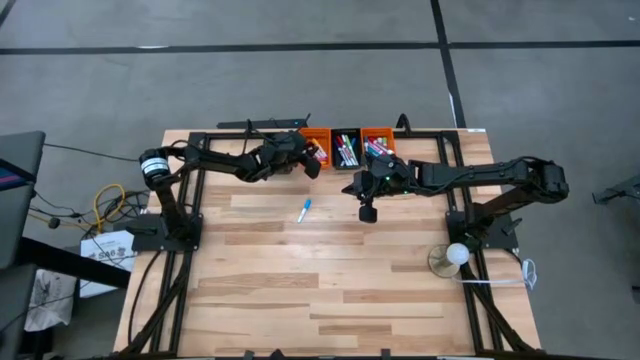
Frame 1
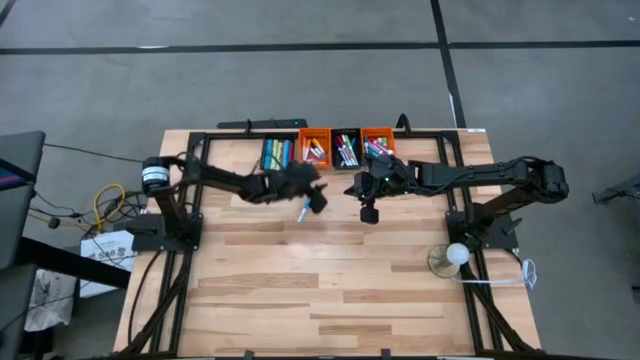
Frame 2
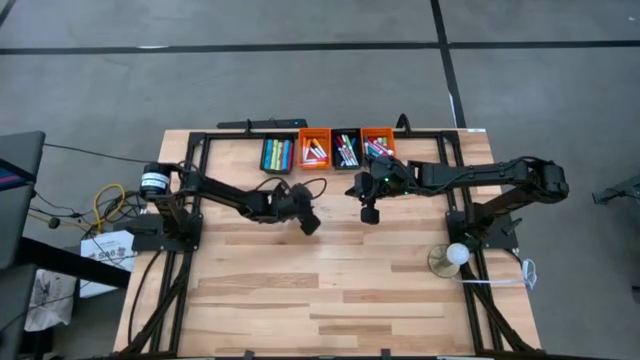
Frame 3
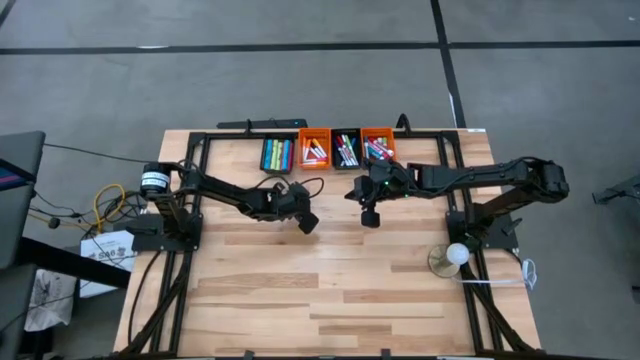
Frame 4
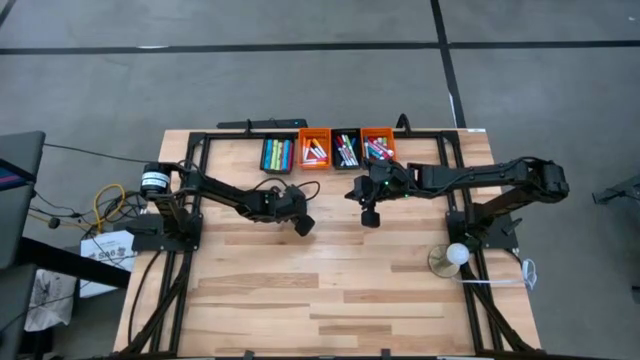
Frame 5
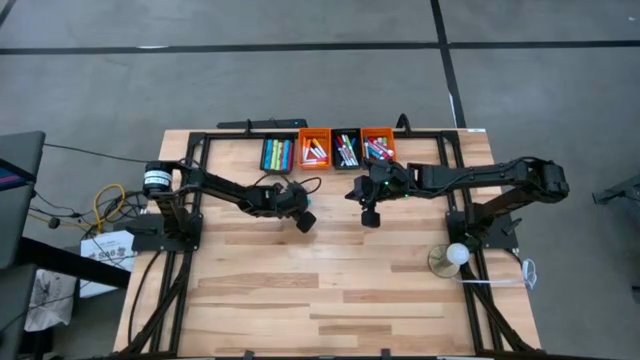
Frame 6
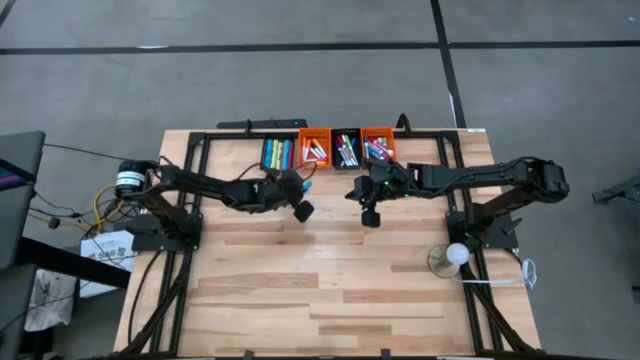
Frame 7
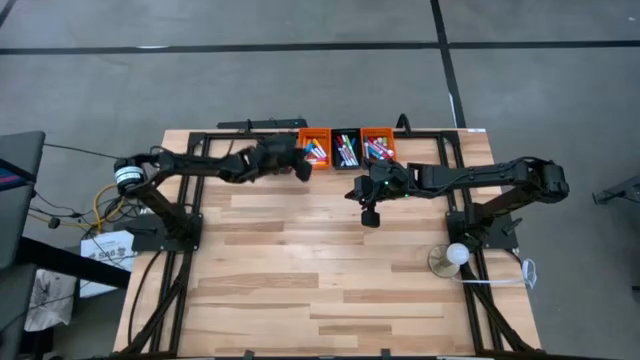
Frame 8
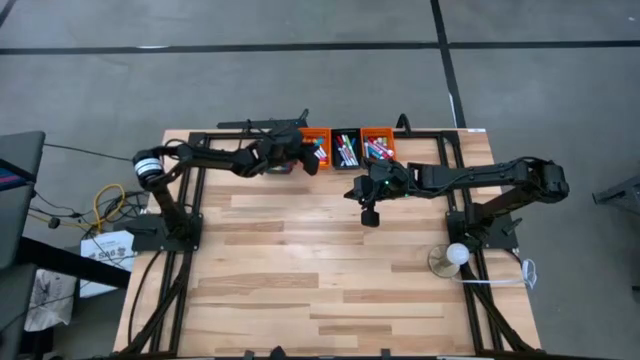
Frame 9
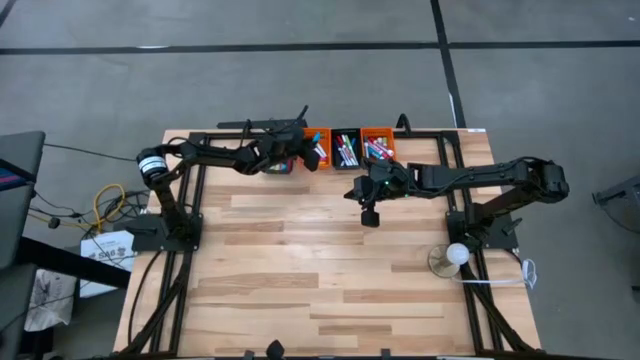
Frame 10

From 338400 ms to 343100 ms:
Task: Pick & Place Markers
Put the small blue highlighter pen into the left orange basket

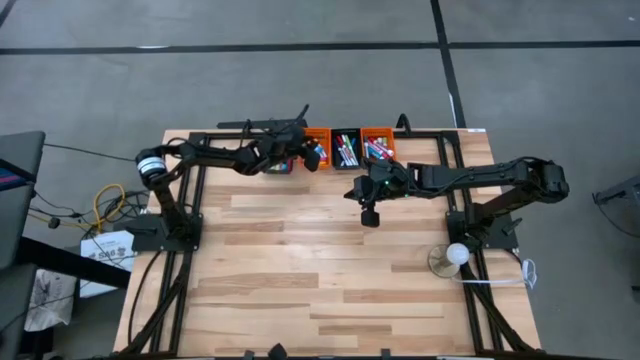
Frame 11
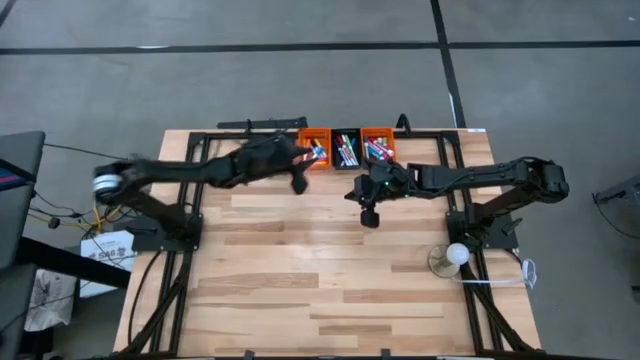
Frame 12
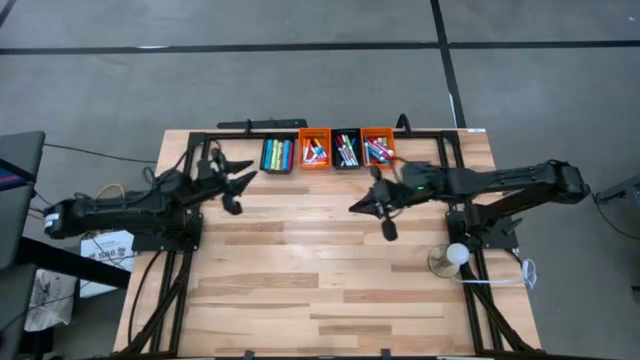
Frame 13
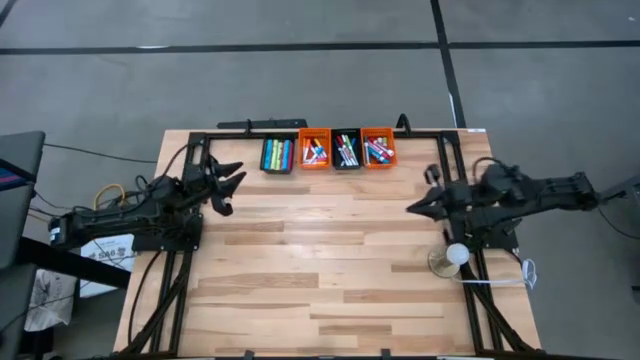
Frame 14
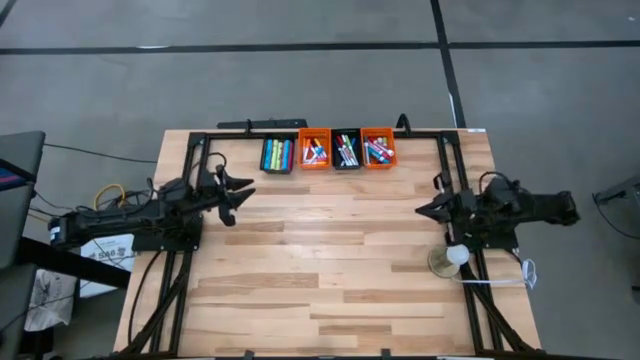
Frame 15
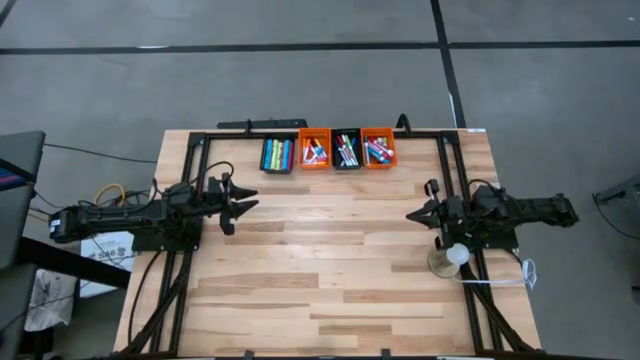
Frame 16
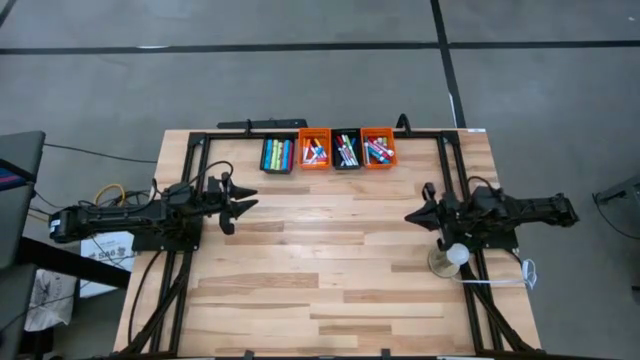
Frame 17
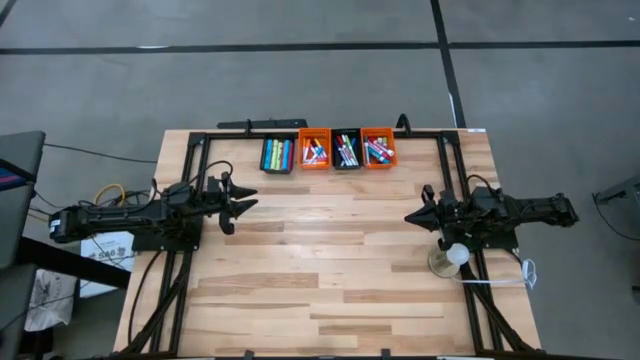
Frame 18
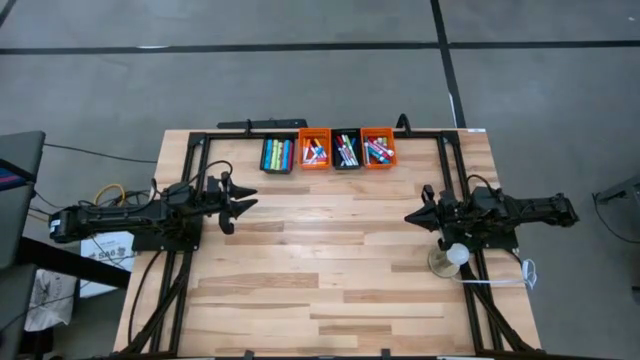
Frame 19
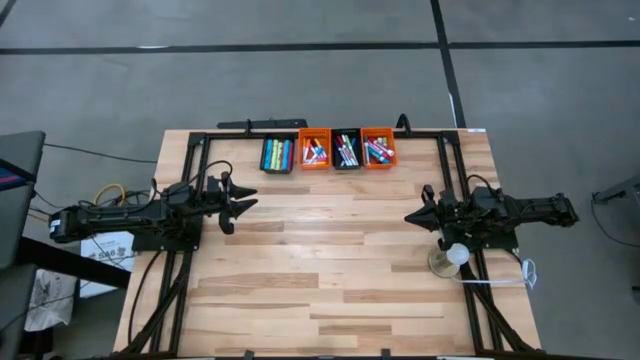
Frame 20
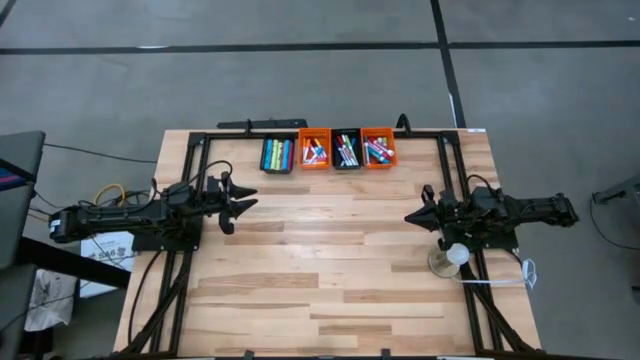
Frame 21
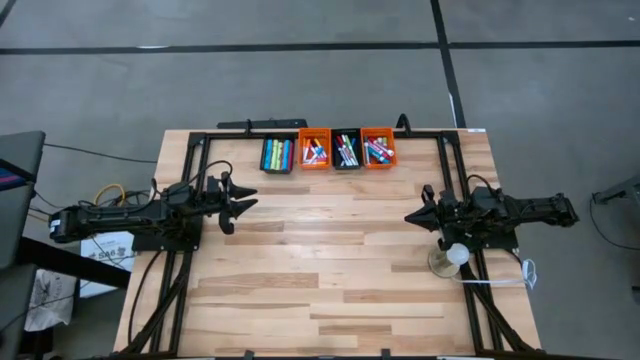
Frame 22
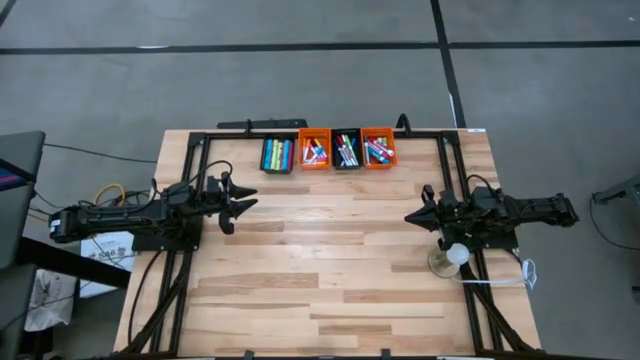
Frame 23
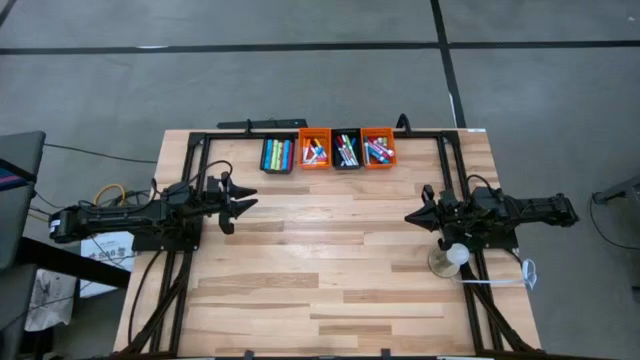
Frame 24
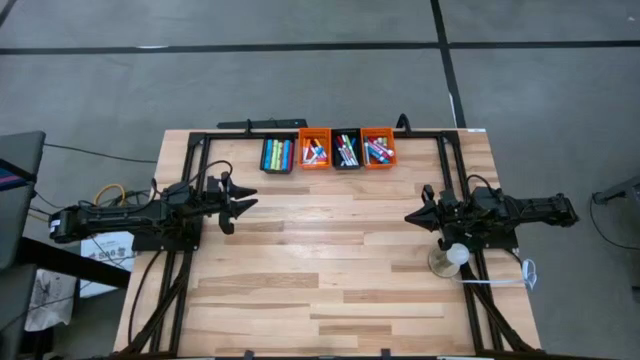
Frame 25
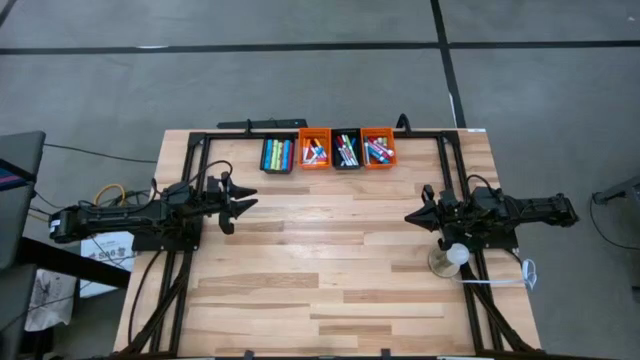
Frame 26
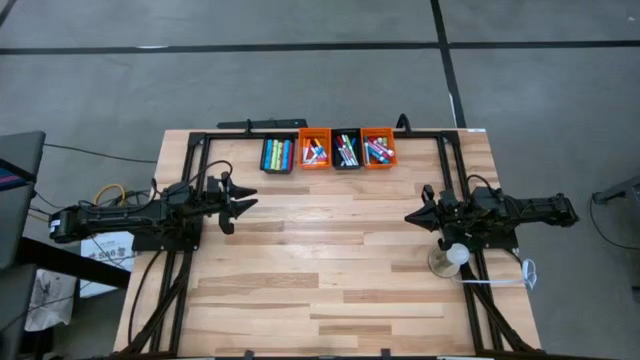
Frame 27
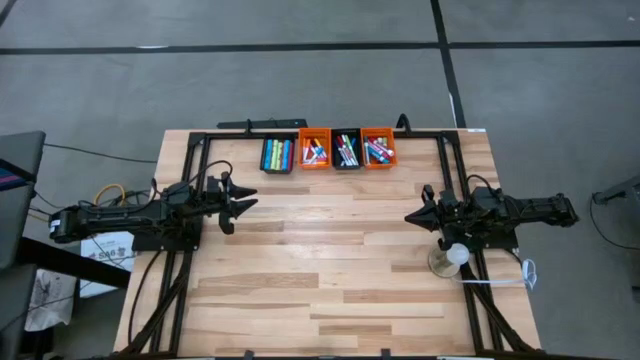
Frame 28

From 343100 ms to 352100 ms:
Return to Home Position

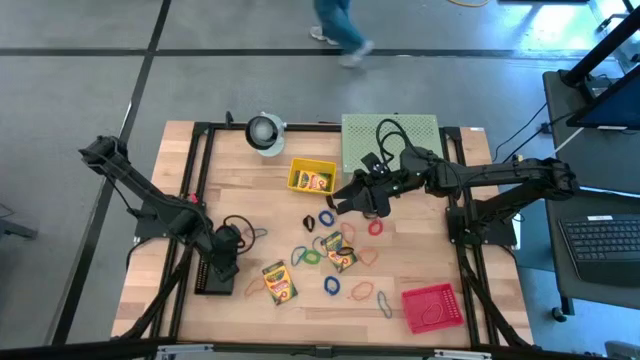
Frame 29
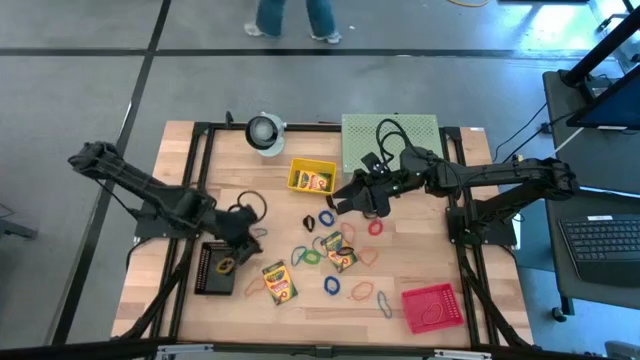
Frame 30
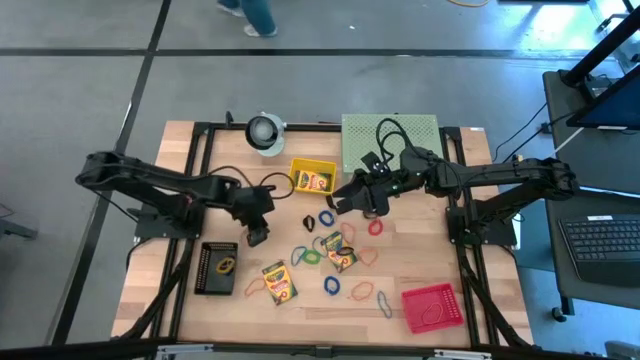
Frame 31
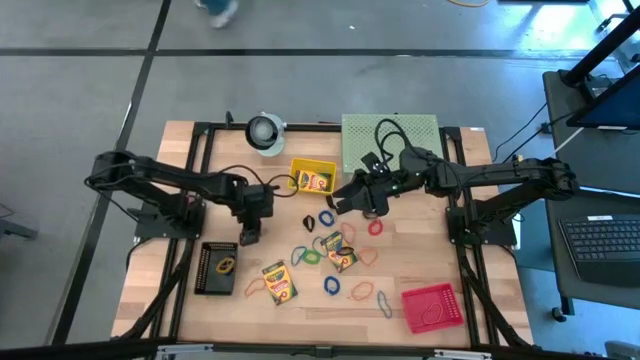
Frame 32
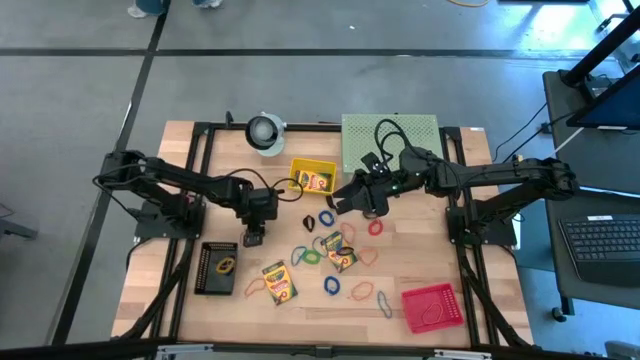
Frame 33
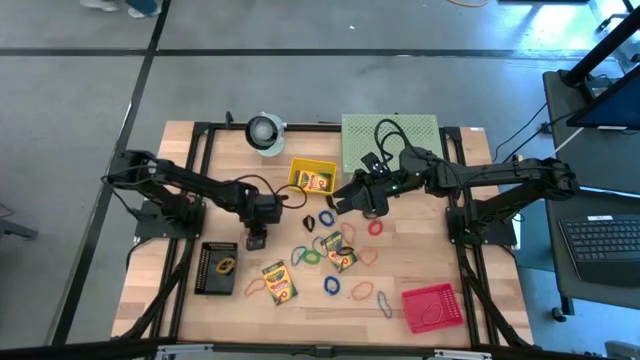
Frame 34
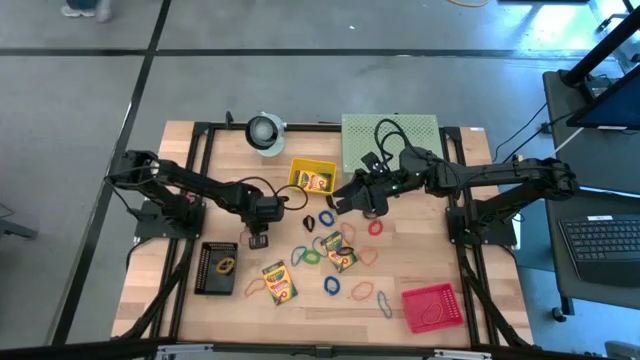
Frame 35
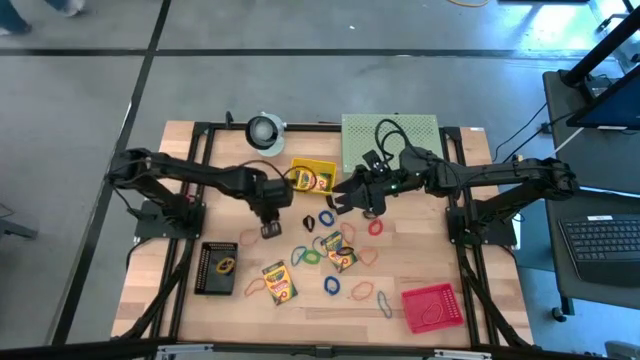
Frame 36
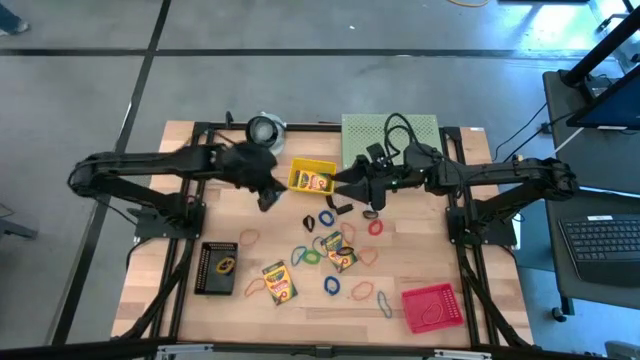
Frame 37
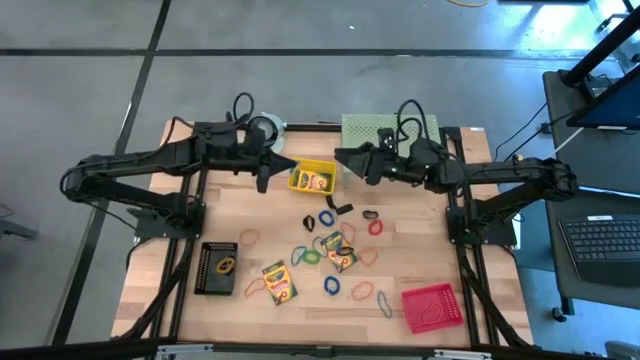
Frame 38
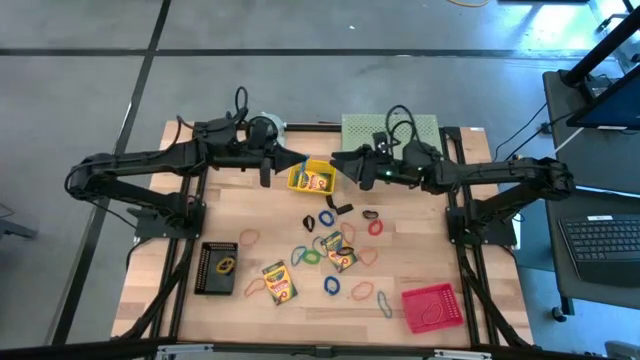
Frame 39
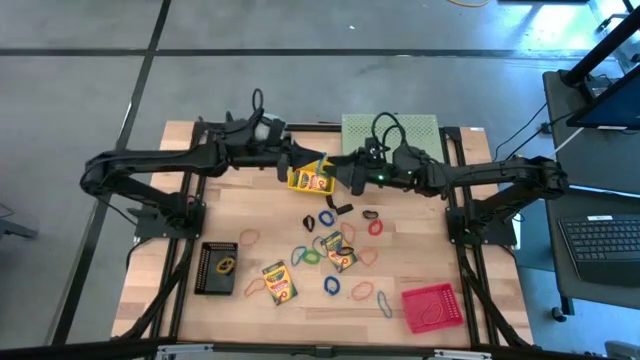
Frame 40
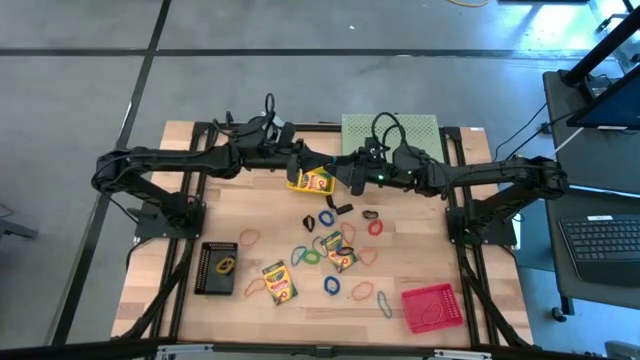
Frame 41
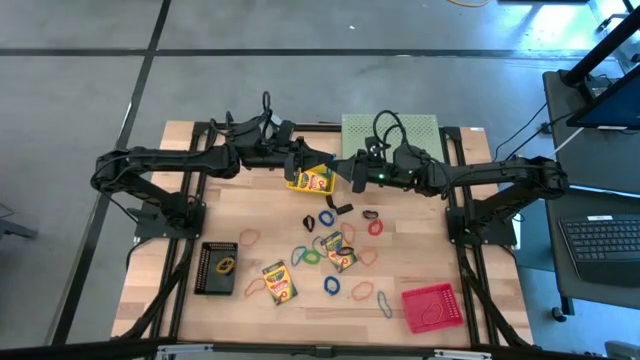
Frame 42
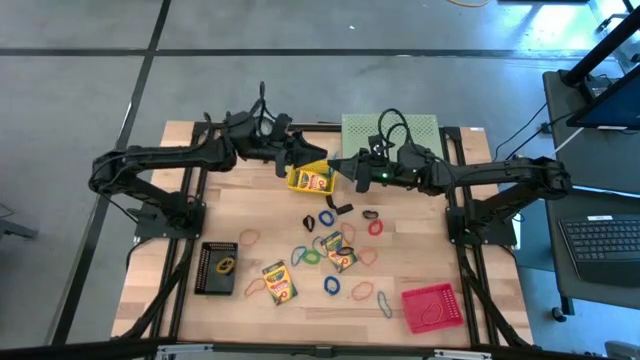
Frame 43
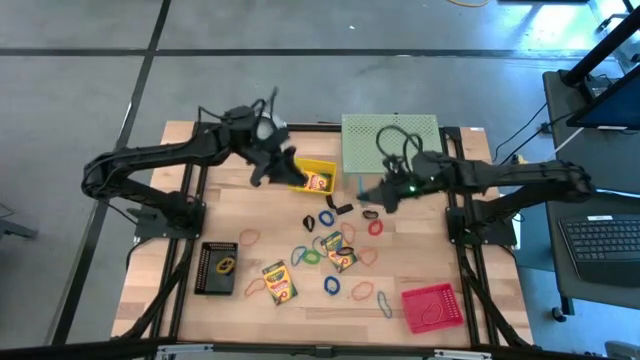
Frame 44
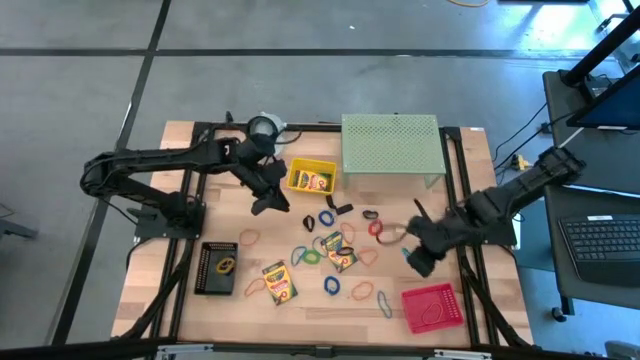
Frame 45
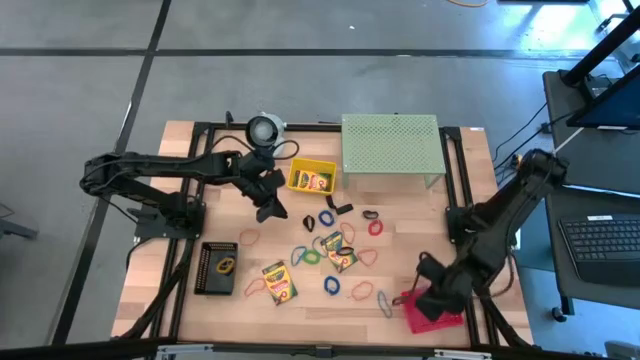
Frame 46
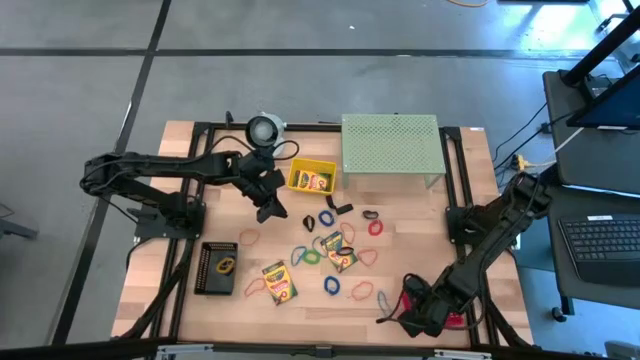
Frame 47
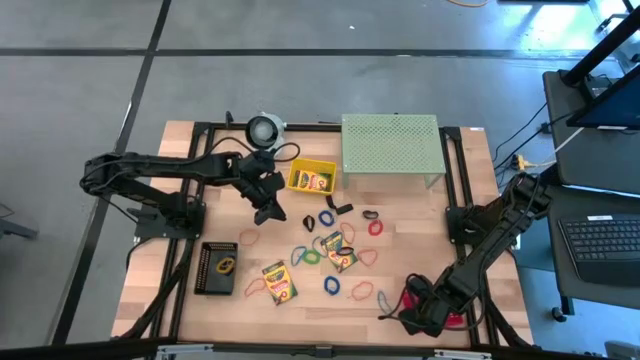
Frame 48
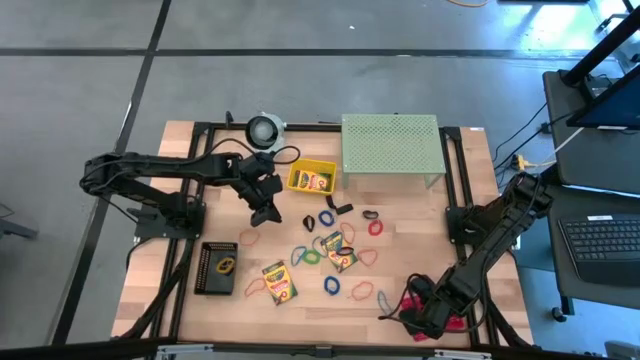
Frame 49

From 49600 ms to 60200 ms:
Task: Pick & Place Office Desk Supplies
Put the blue rubber band into the red bin
